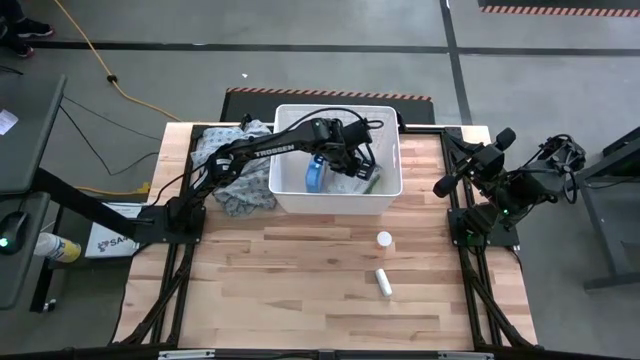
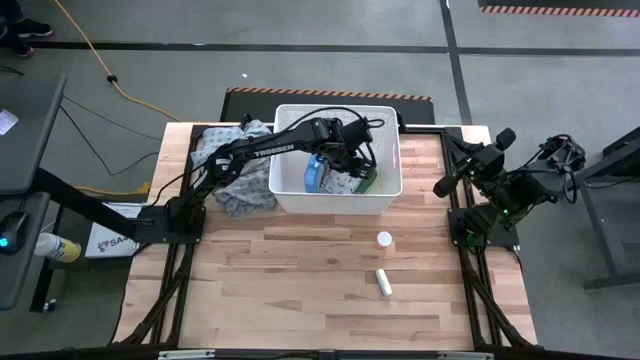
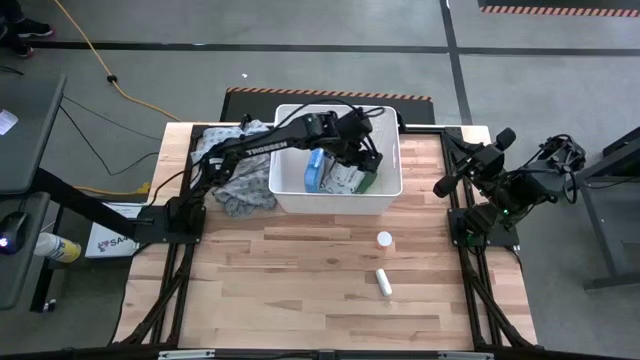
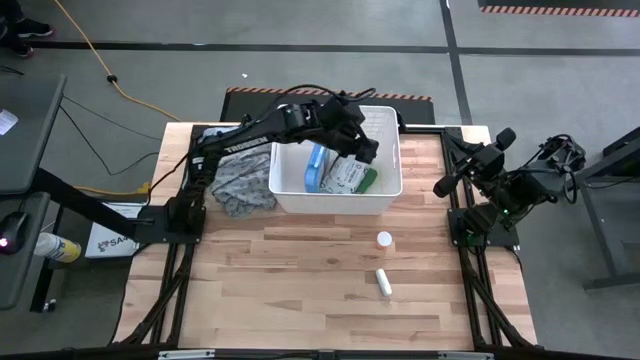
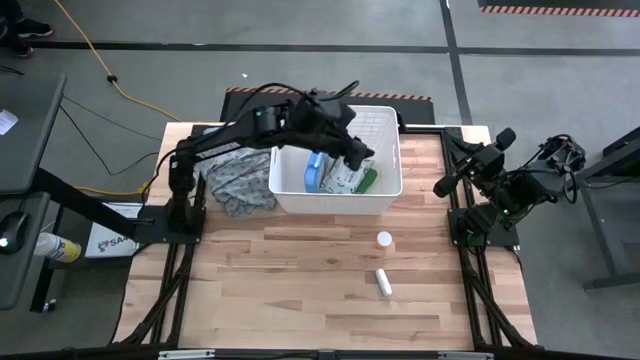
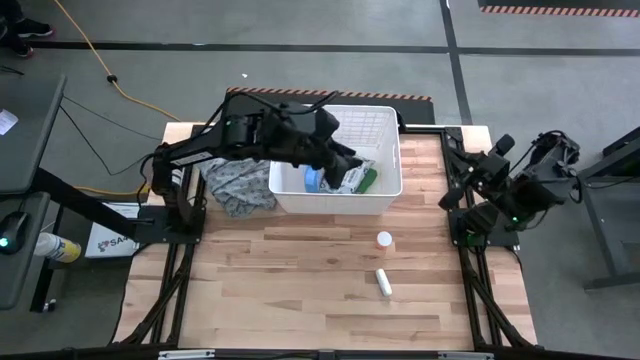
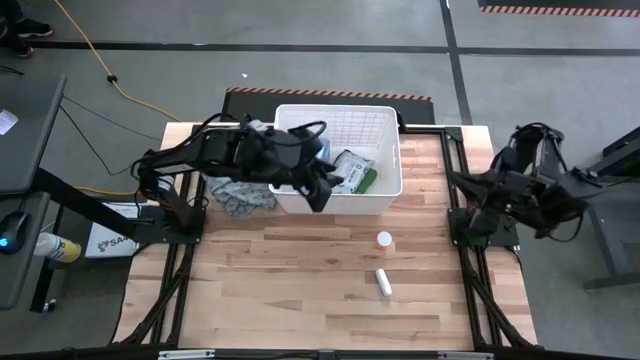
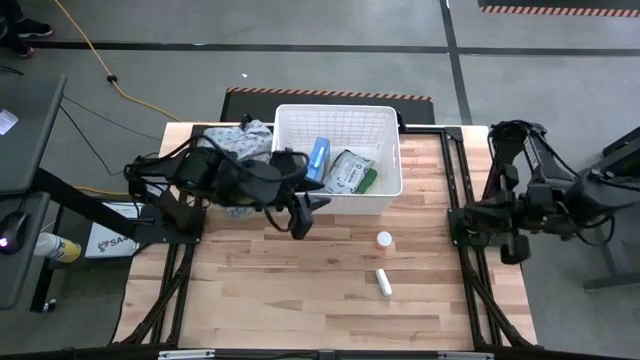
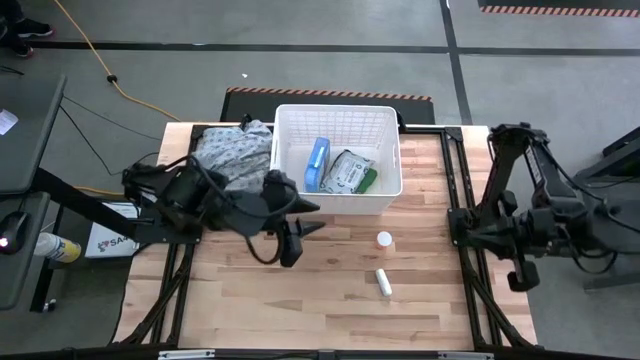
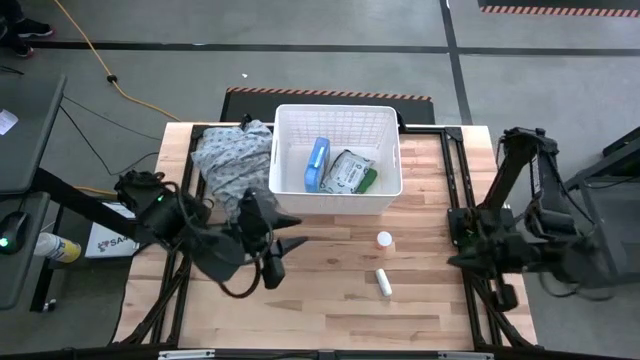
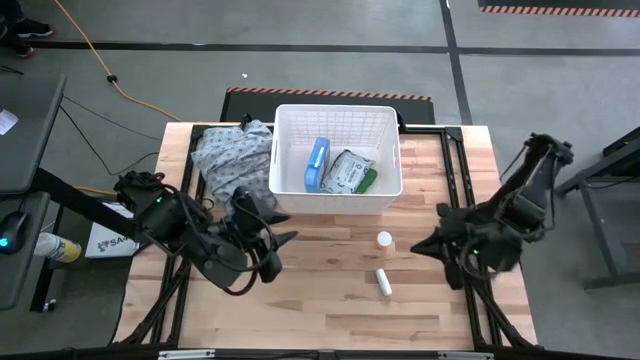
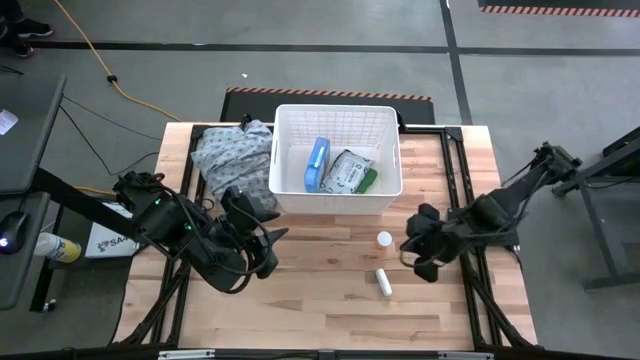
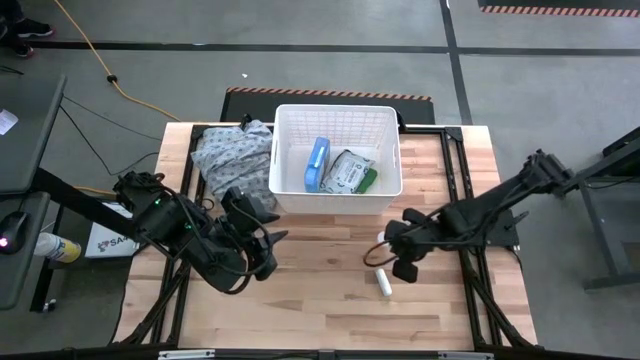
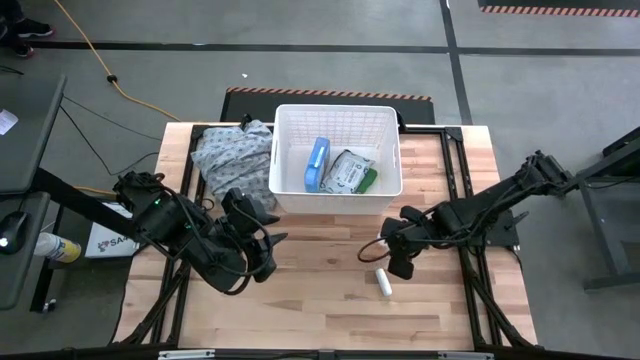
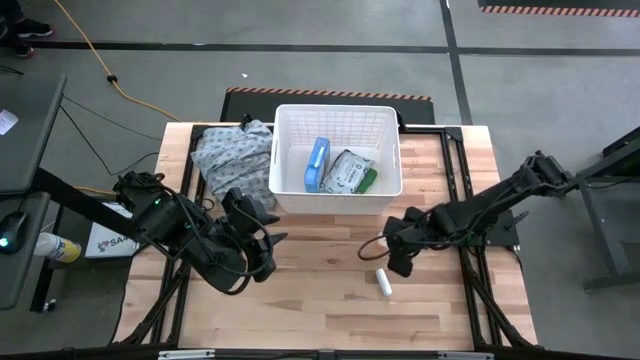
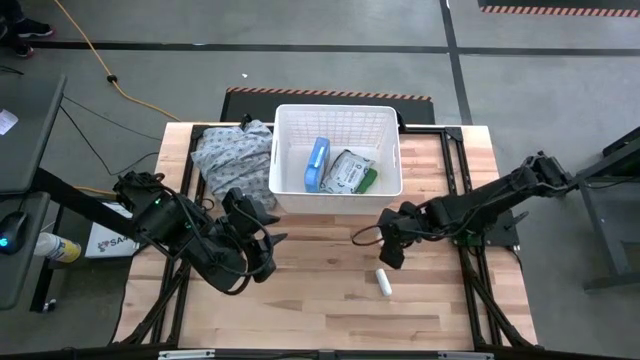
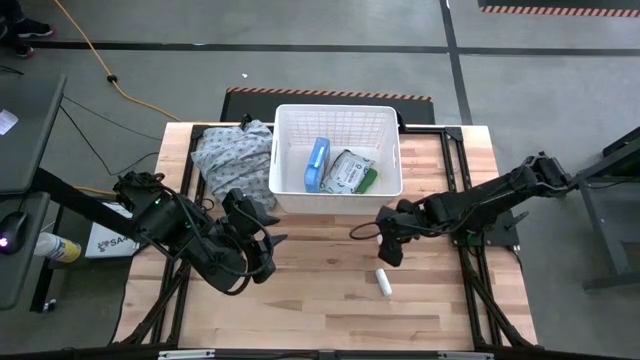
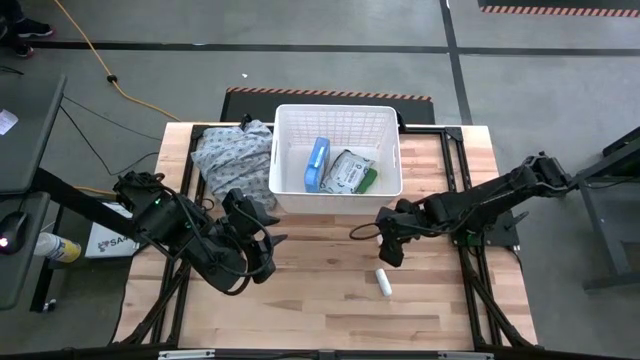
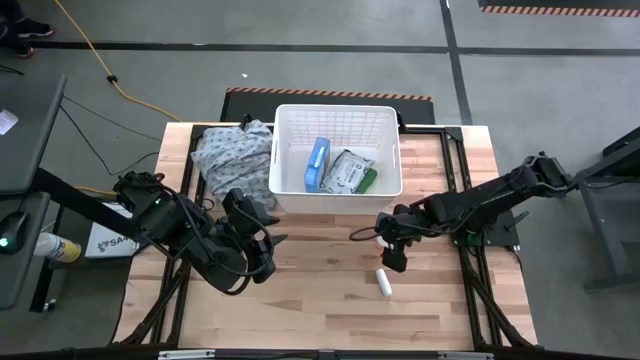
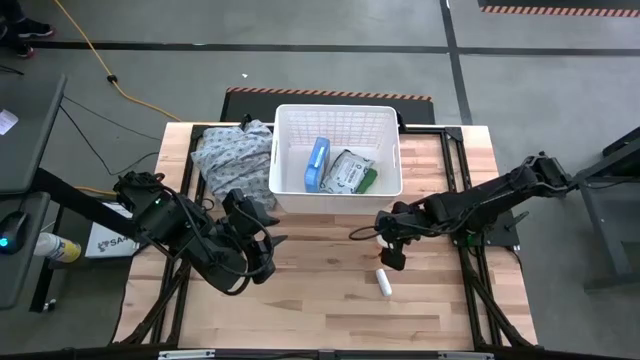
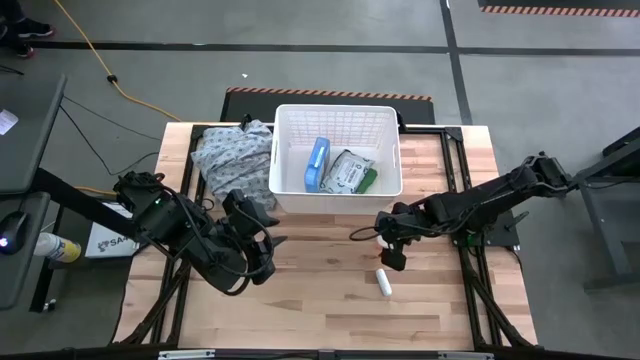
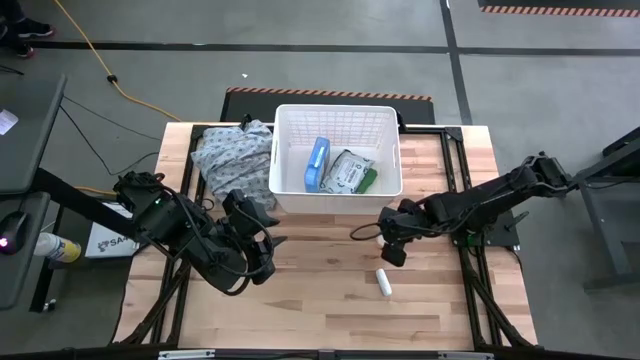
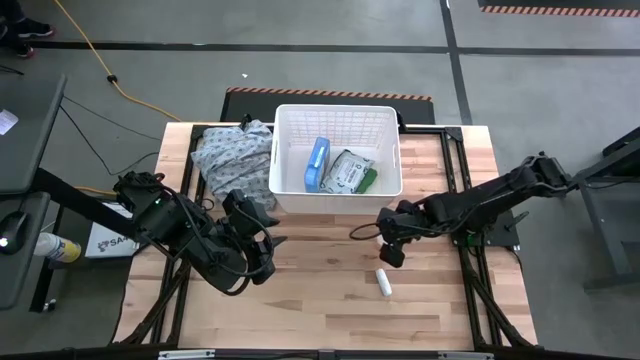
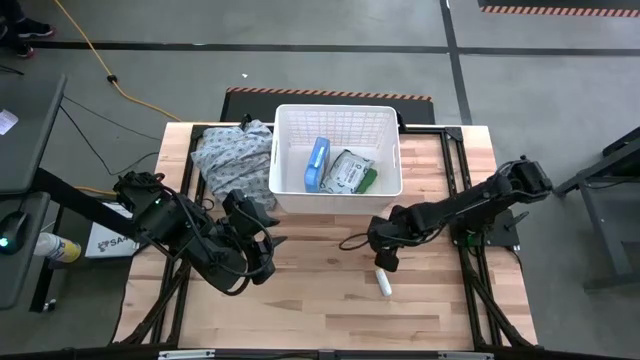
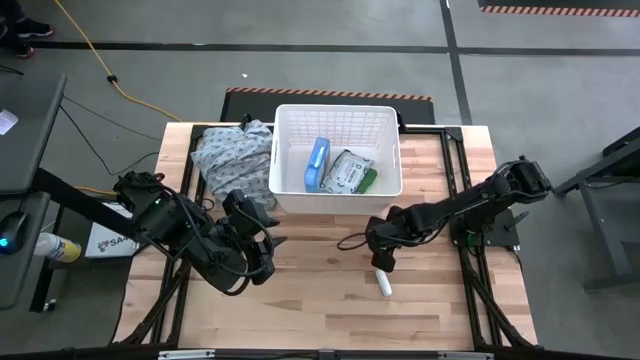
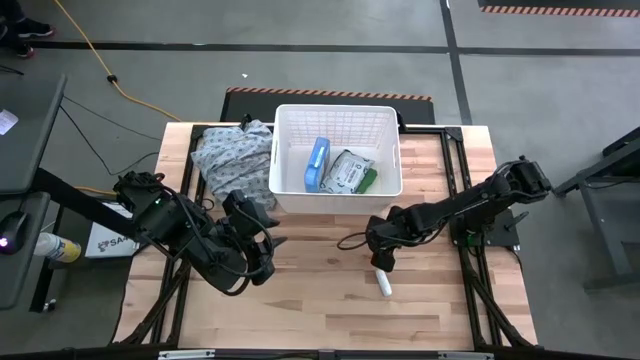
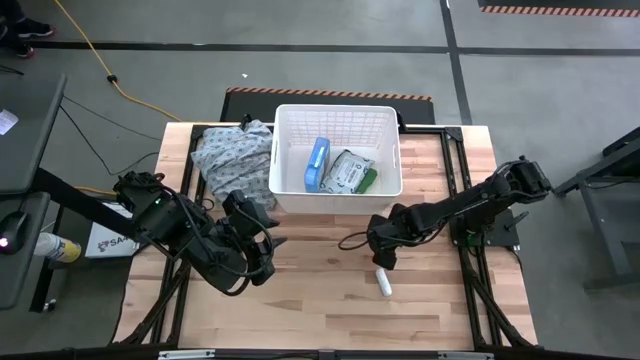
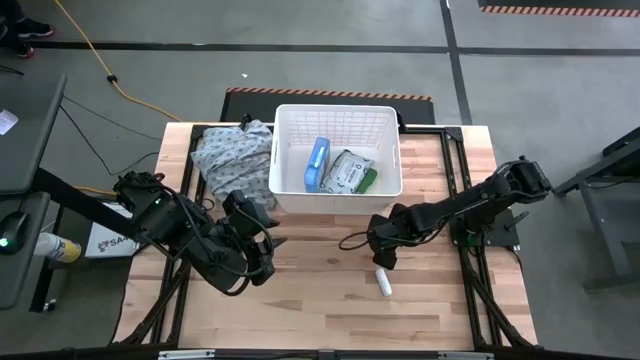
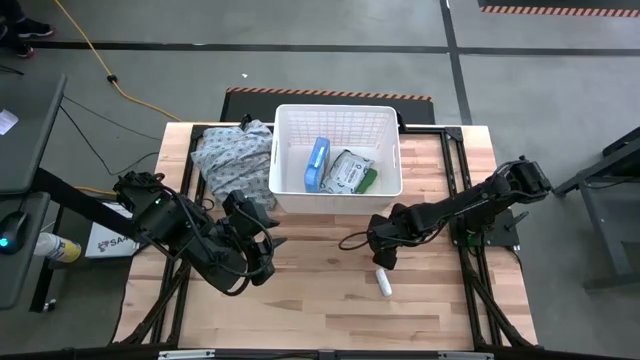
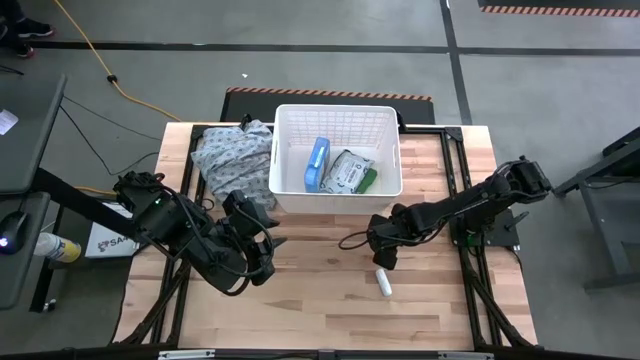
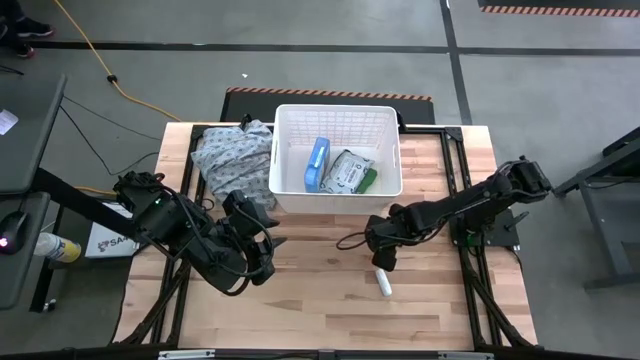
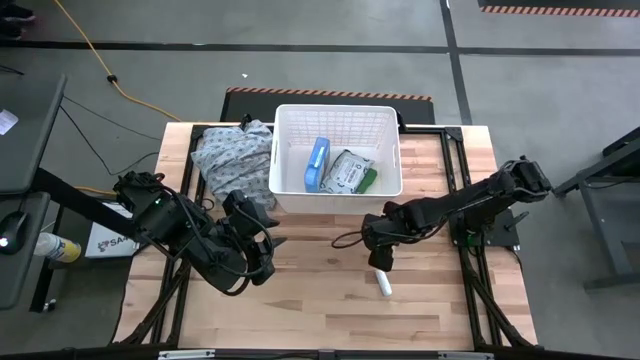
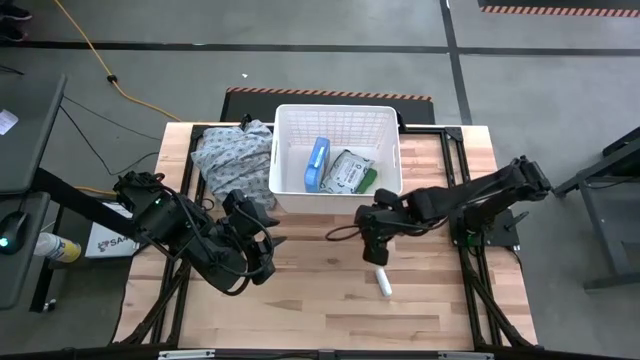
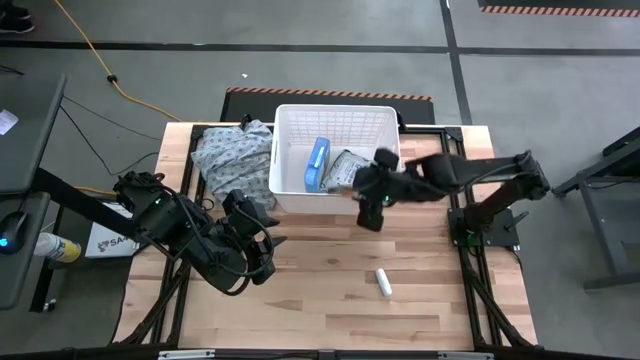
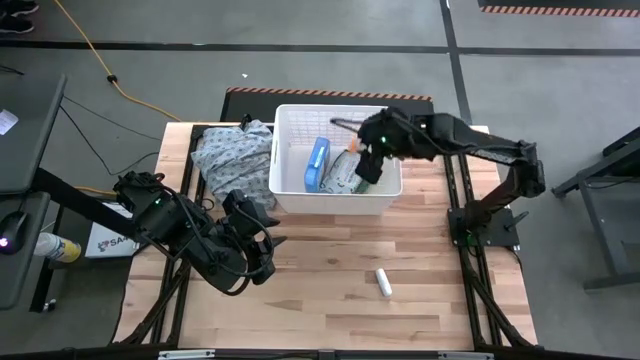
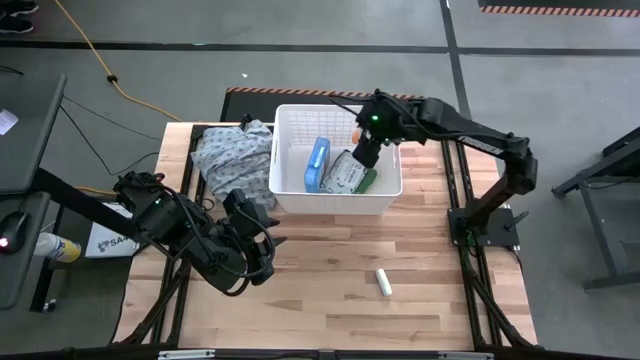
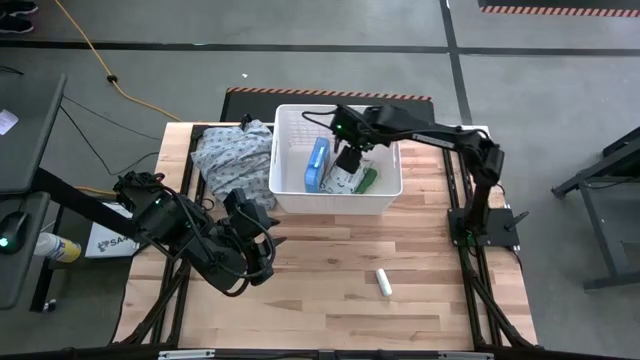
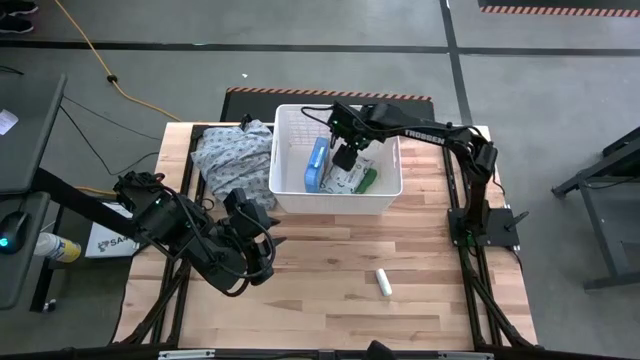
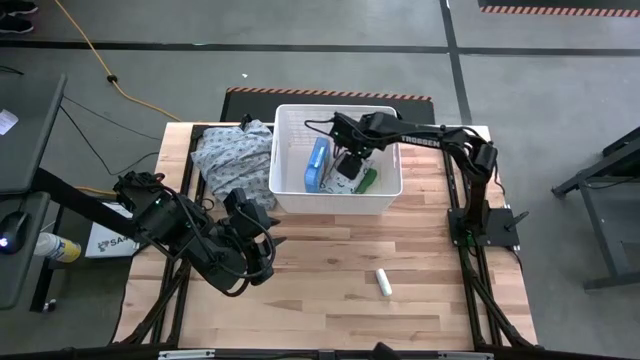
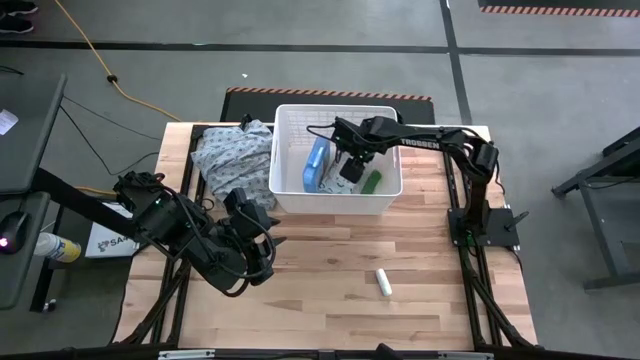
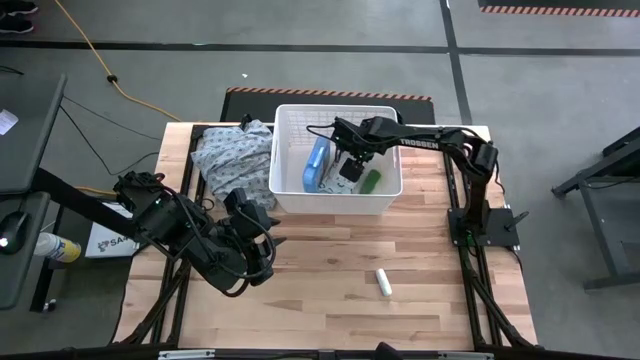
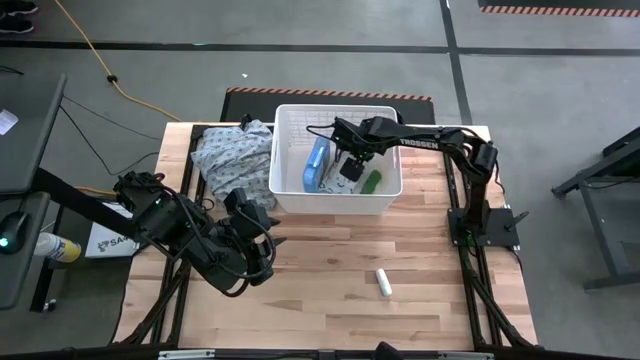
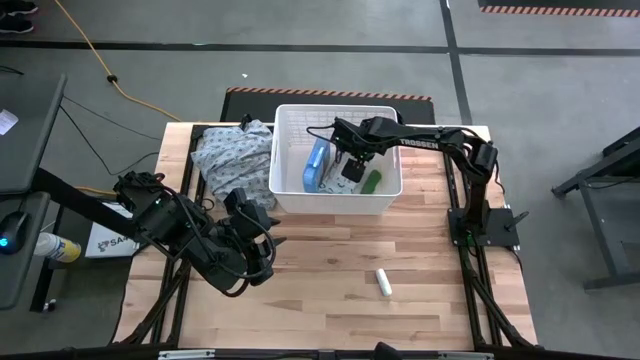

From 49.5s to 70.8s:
Task: Pick & place medical supplies in basket/bin
Put the orange pill bottle into the white bin

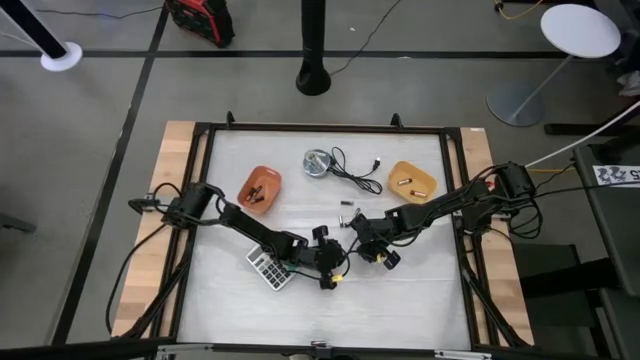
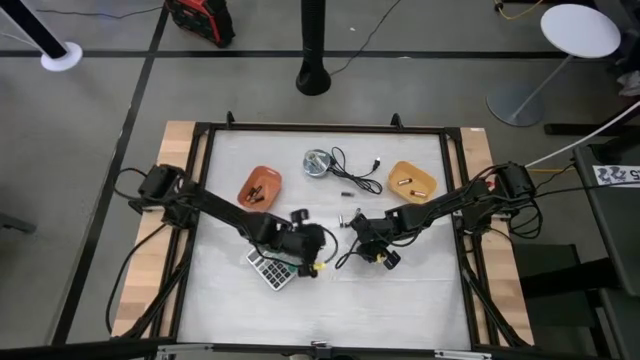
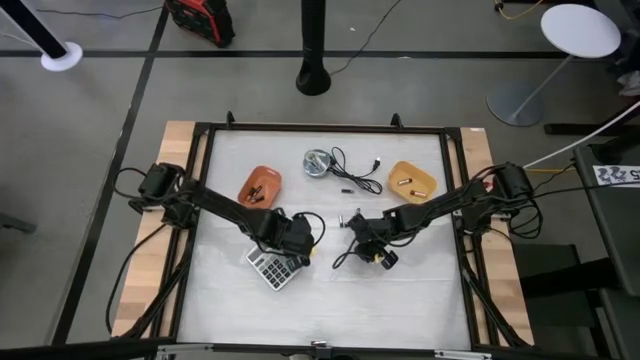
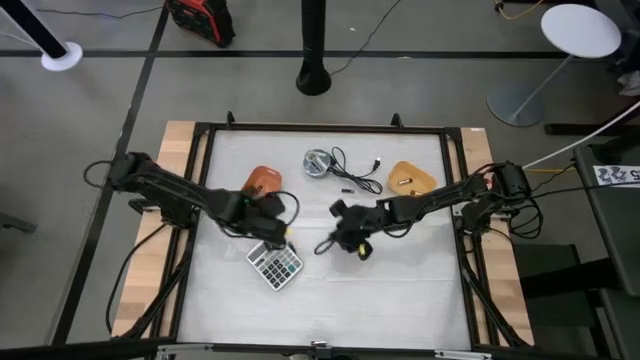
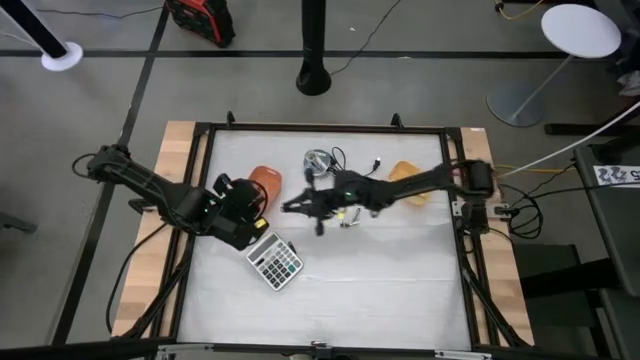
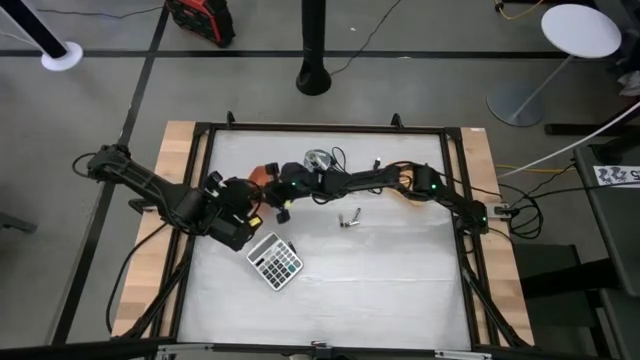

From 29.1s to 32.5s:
Task: Sort batteries
Put the black battery into the orange bin
